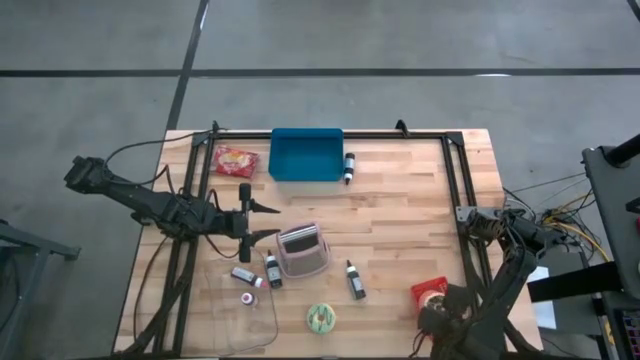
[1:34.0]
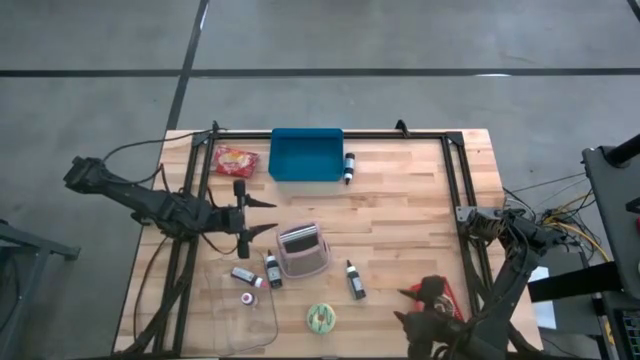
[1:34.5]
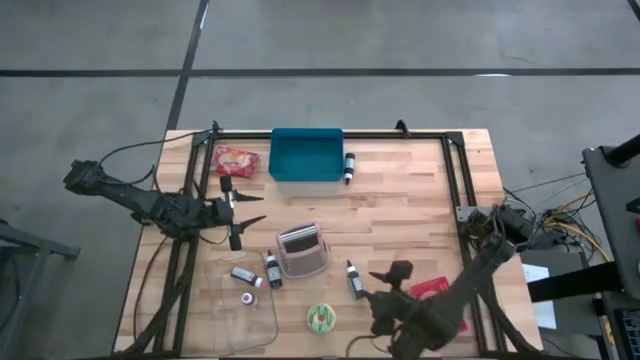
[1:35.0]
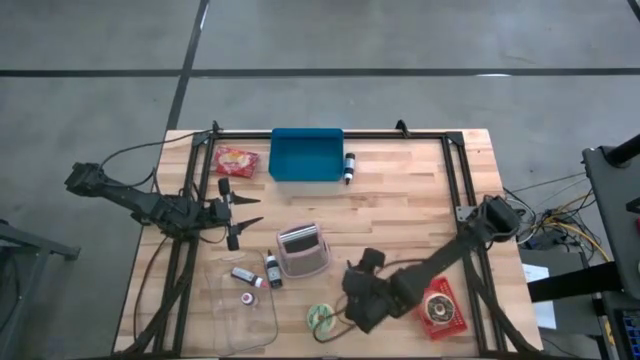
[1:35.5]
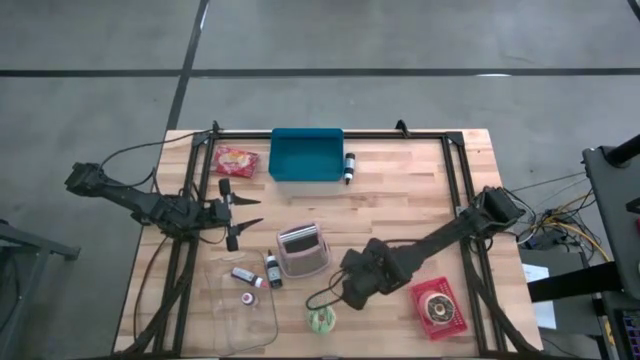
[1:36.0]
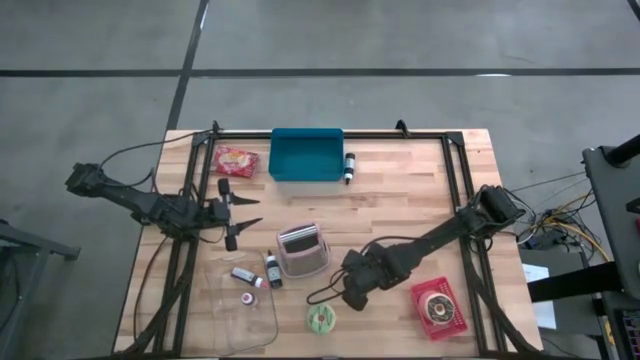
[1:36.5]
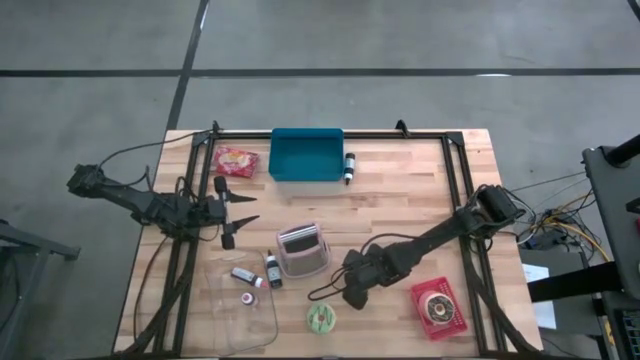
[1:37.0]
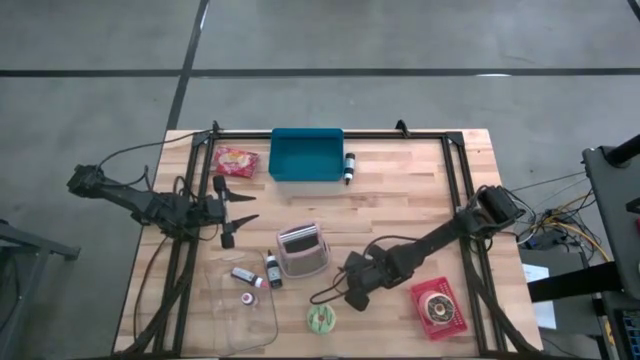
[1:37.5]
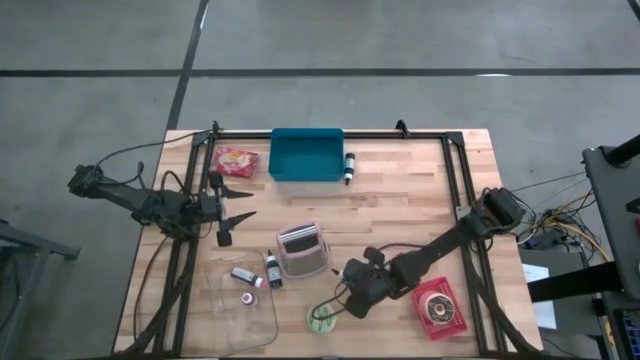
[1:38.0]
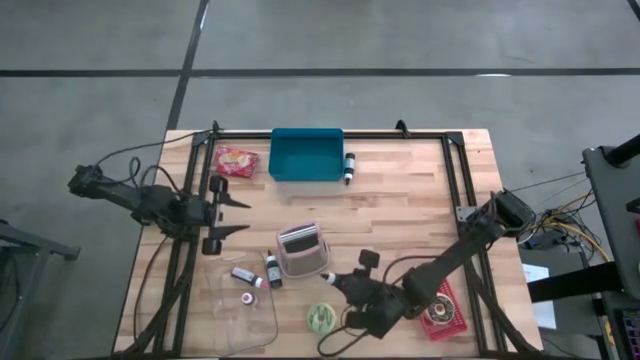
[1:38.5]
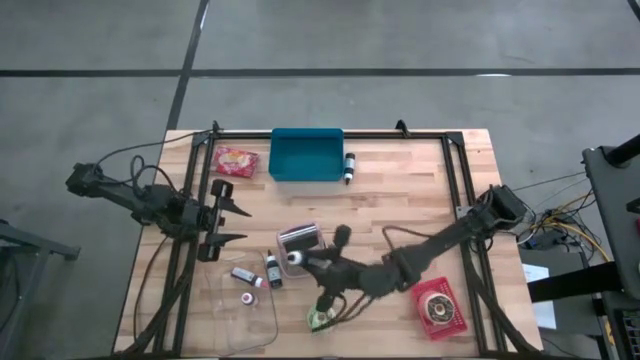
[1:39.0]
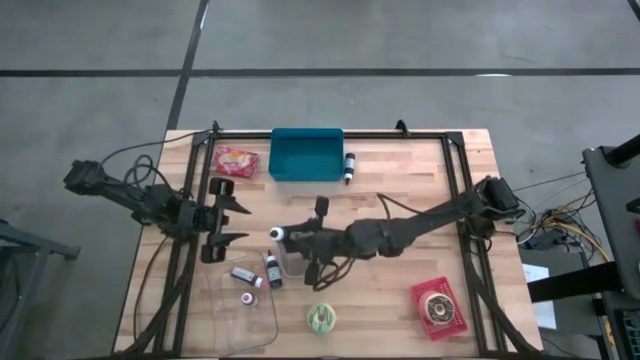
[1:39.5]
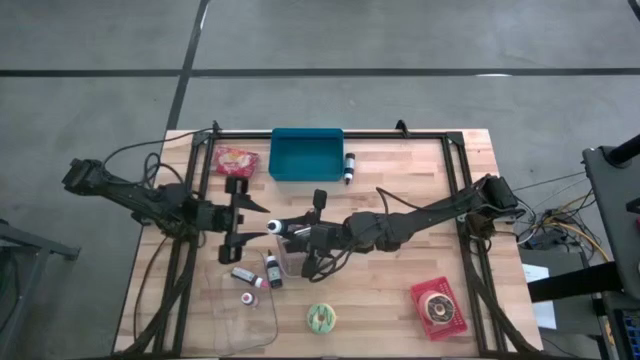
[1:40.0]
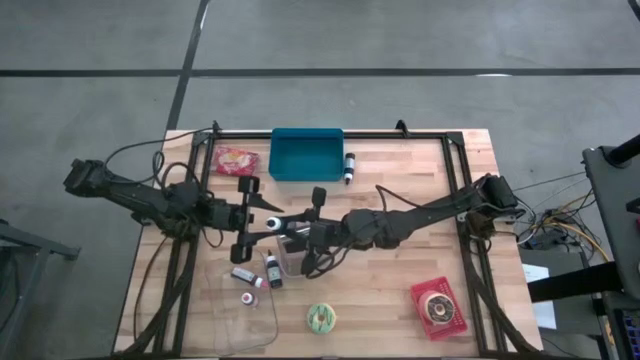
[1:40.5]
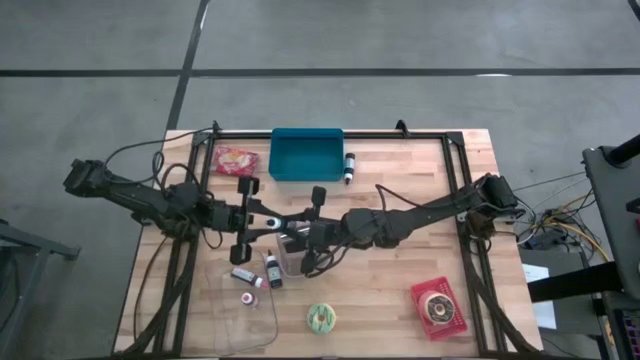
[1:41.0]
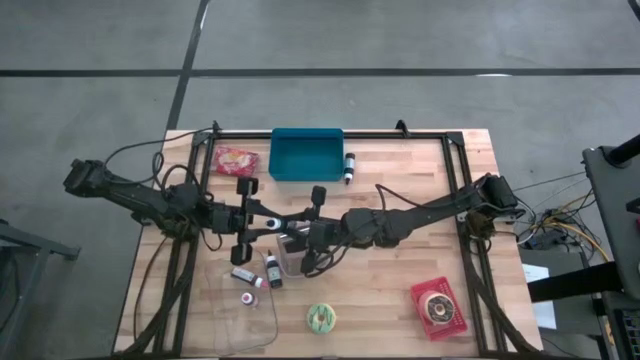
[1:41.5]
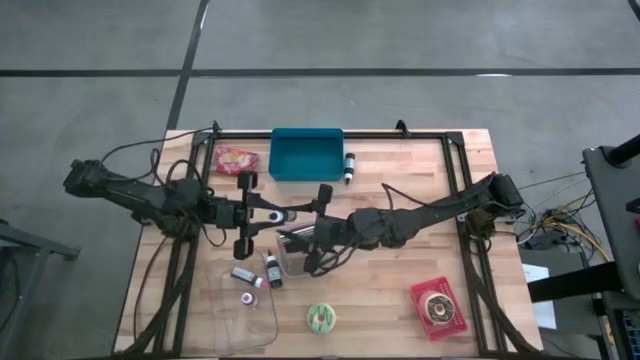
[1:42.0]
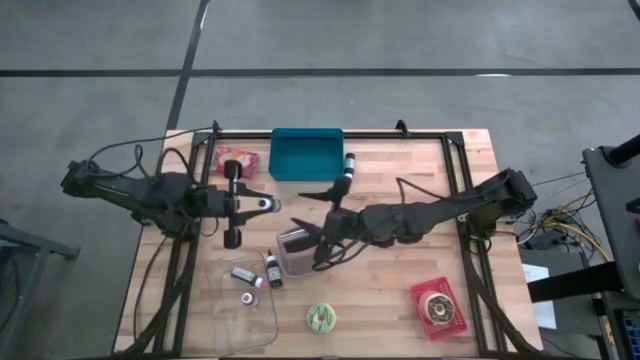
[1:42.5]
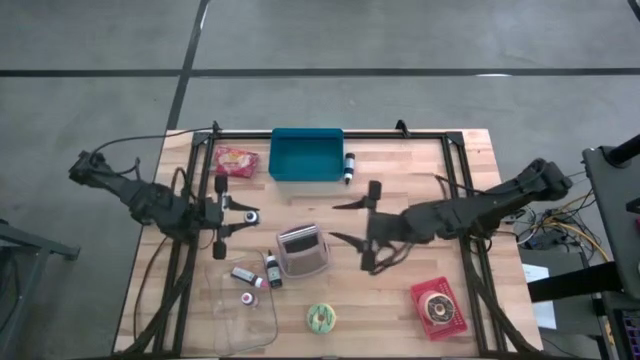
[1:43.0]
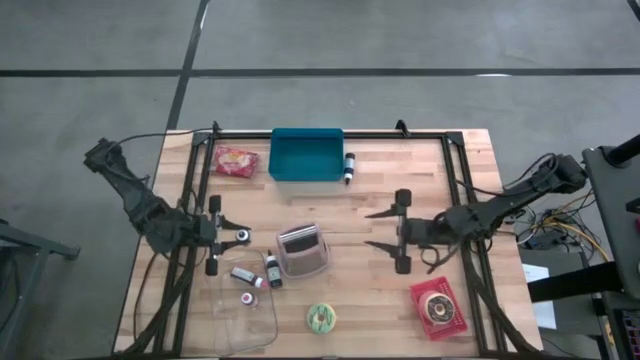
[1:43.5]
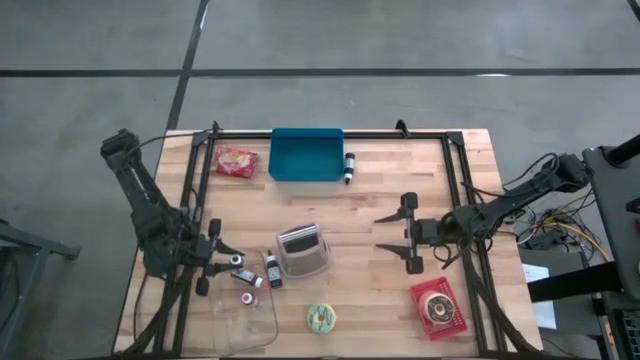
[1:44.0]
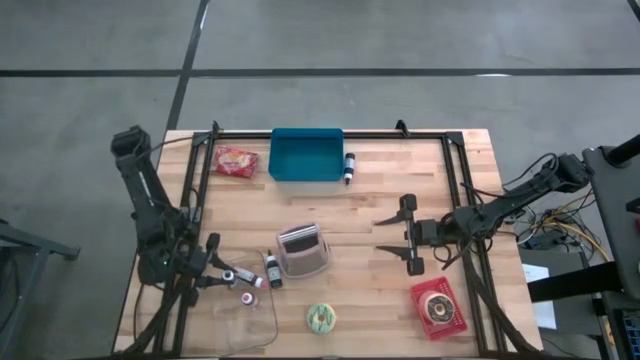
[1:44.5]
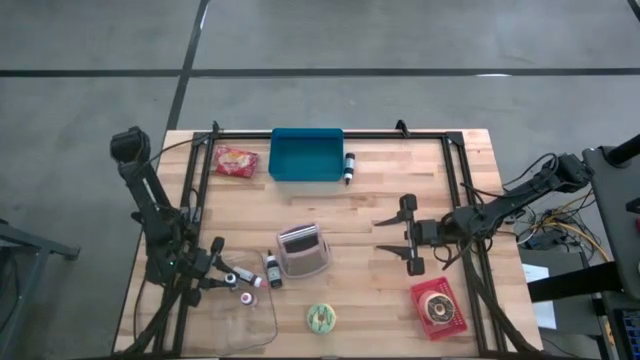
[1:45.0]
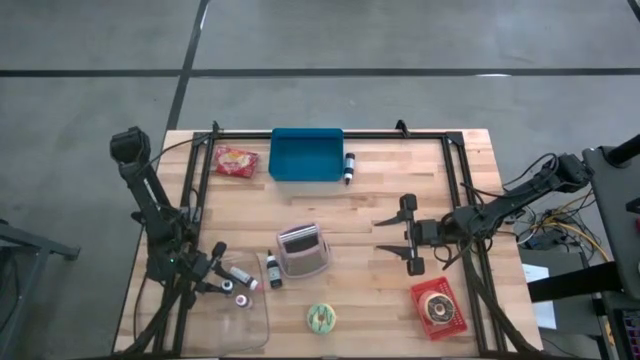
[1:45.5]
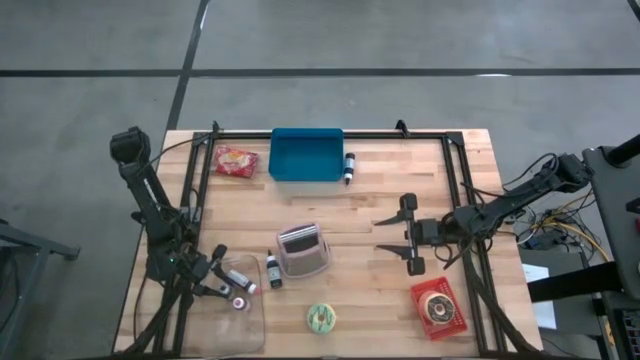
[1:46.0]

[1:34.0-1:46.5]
Task: Pick & Place Food Item
Put the bottom right black food coloring bottle into the transparent bin

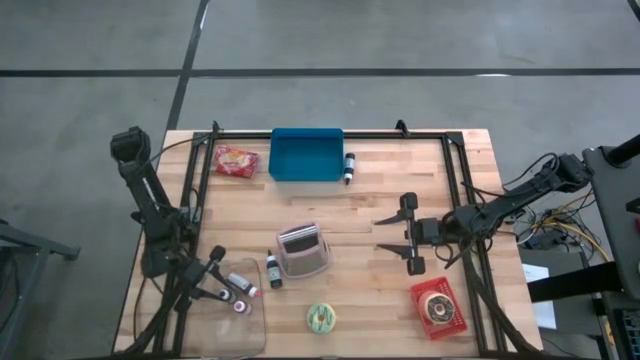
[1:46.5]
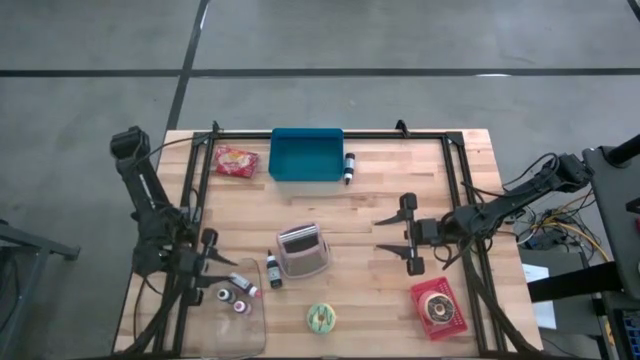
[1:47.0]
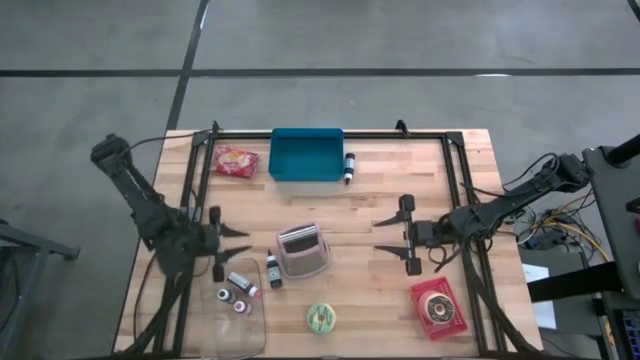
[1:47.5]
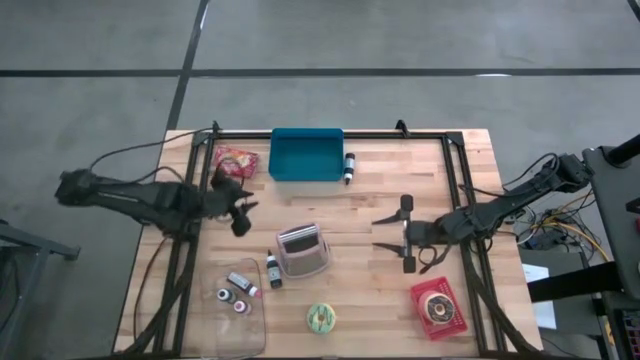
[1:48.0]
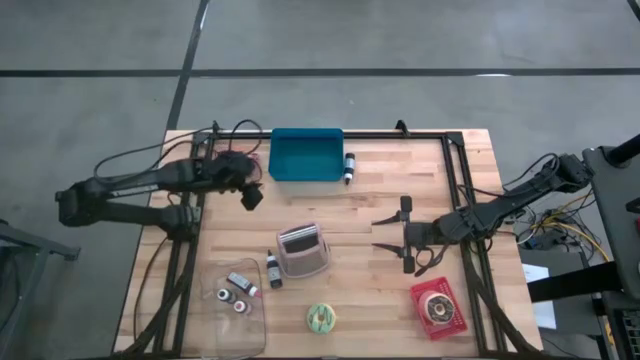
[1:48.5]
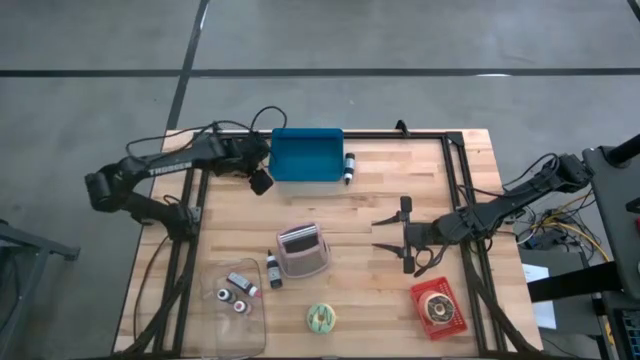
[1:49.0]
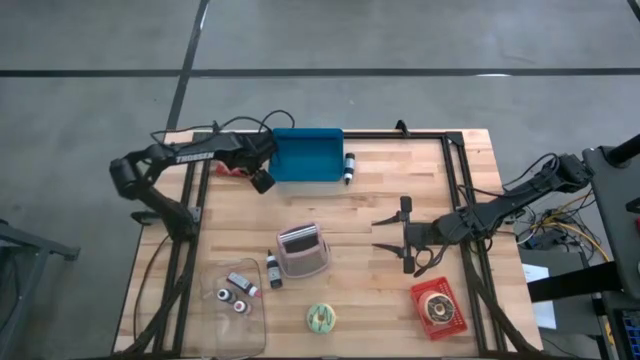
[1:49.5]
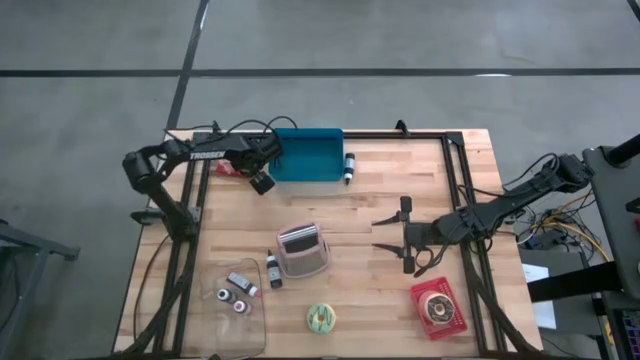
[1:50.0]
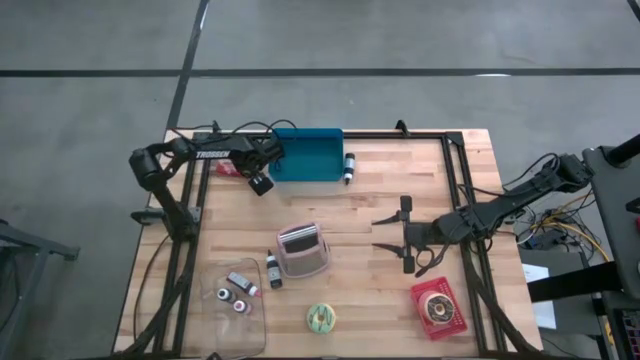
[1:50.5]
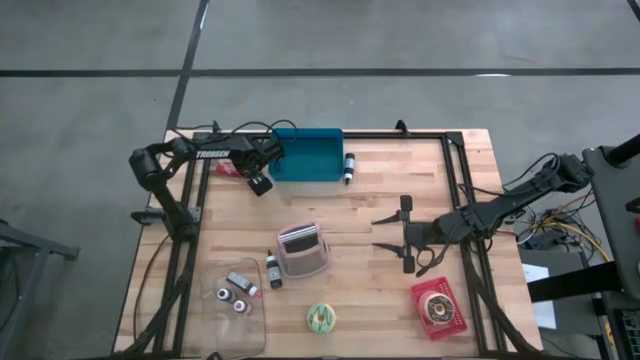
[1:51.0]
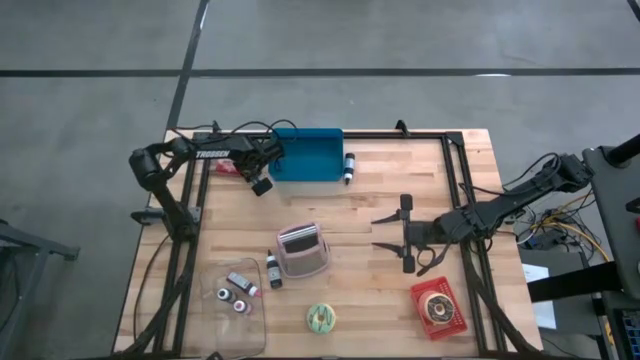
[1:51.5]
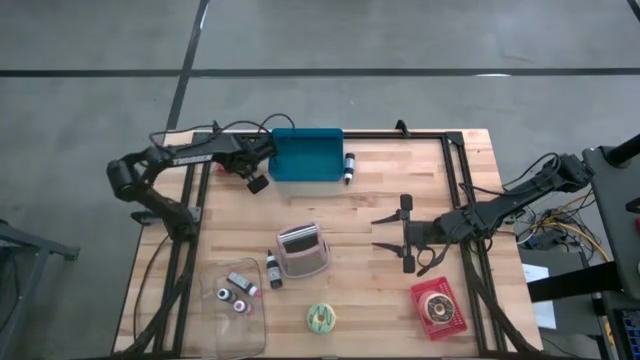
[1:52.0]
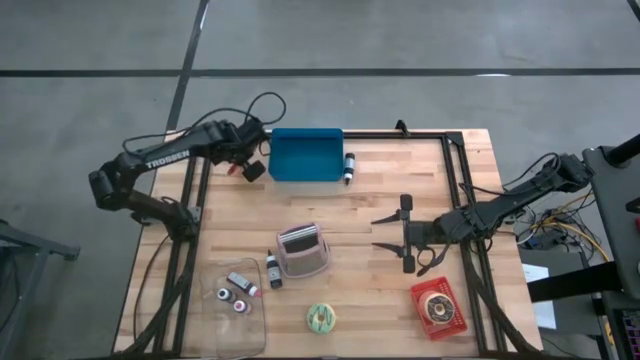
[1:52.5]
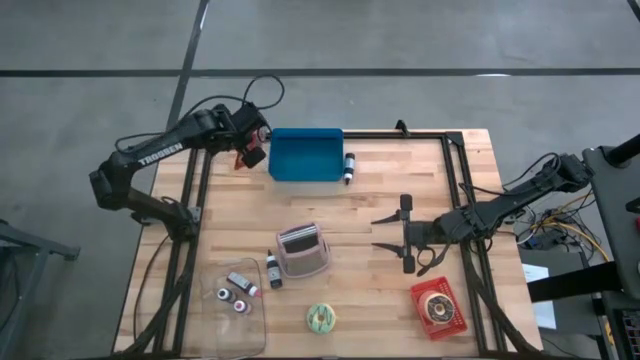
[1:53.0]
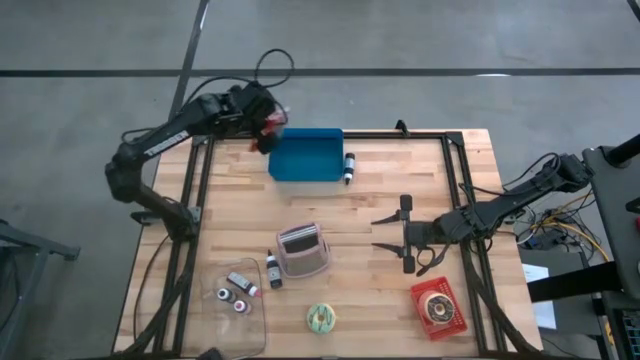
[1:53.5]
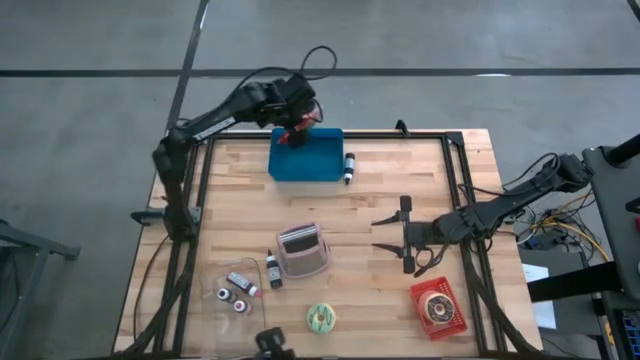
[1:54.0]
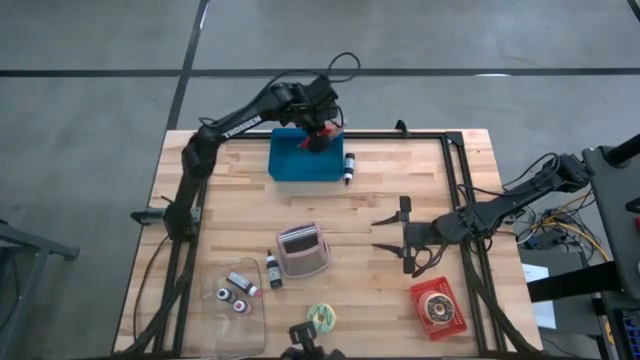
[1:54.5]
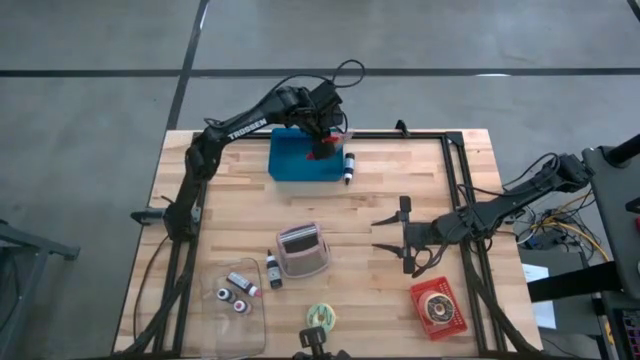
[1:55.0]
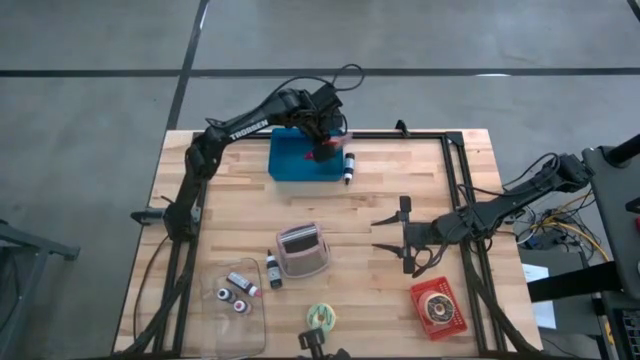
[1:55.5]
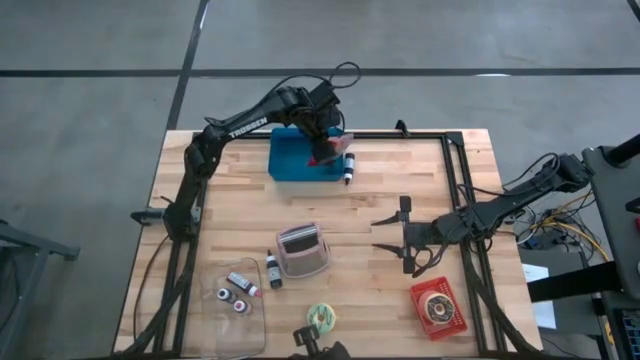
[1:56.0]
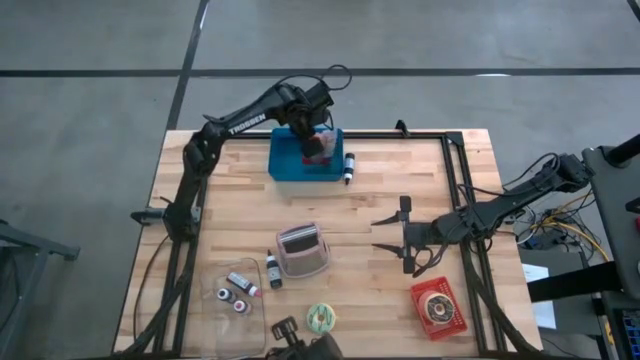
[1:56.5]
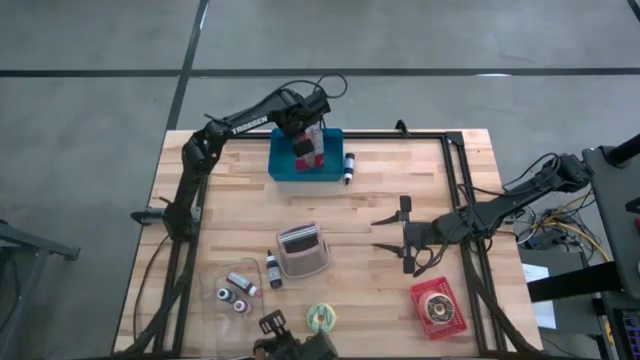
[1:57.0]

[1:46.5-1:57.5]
Put the red popcorn bag into the blue bin
